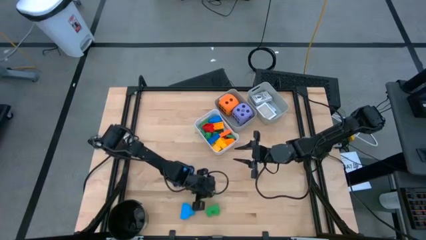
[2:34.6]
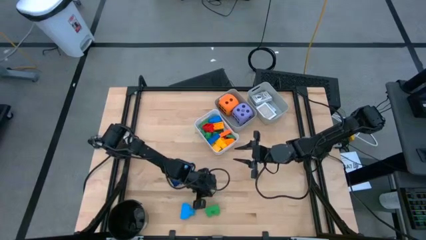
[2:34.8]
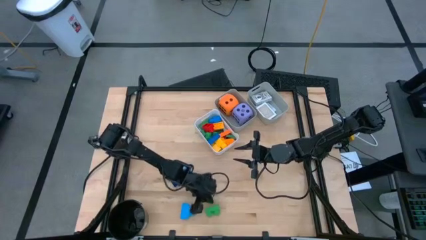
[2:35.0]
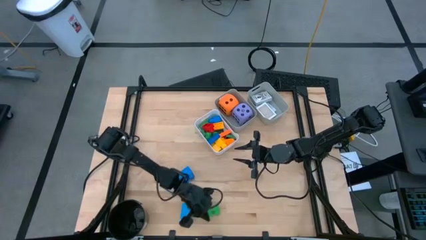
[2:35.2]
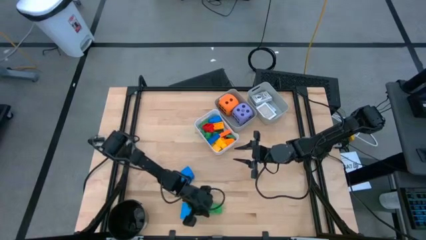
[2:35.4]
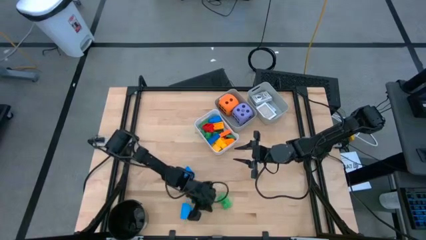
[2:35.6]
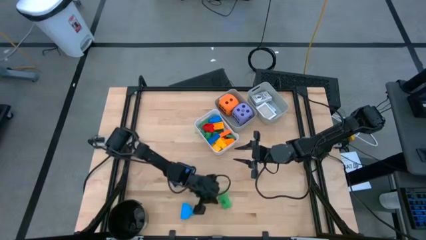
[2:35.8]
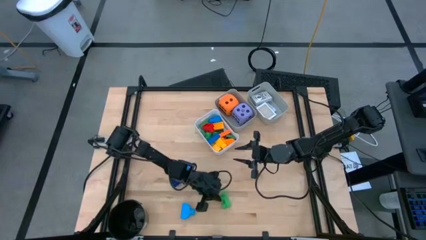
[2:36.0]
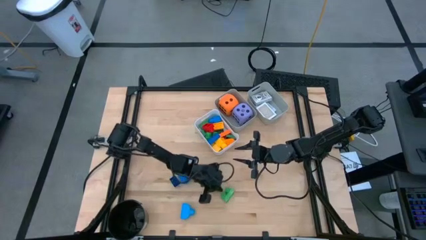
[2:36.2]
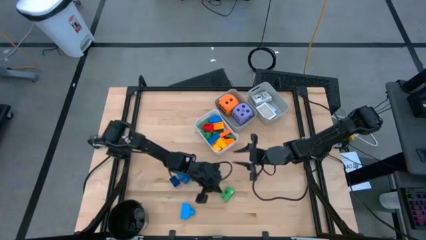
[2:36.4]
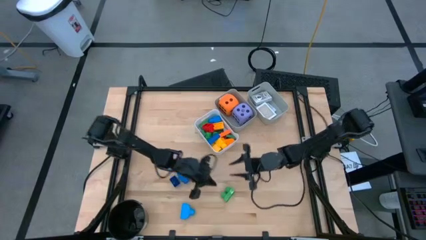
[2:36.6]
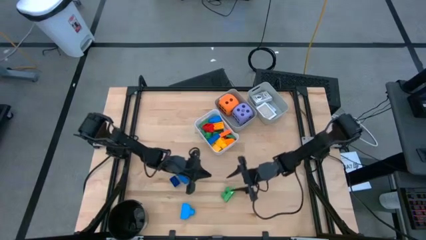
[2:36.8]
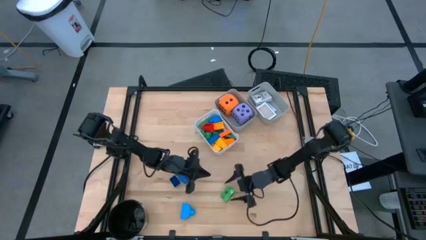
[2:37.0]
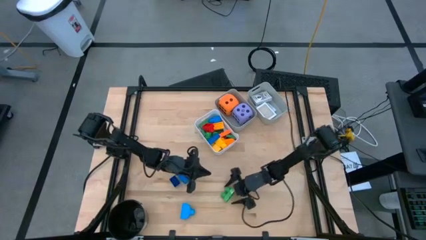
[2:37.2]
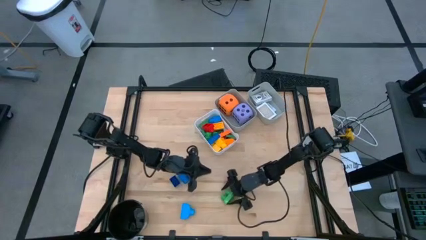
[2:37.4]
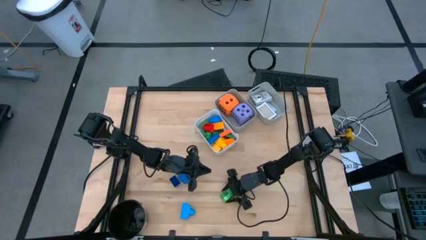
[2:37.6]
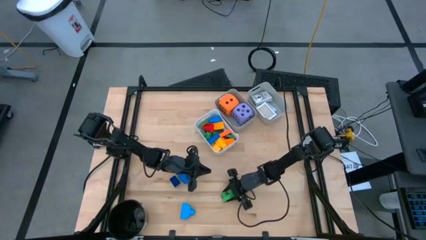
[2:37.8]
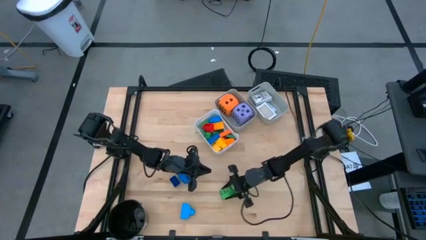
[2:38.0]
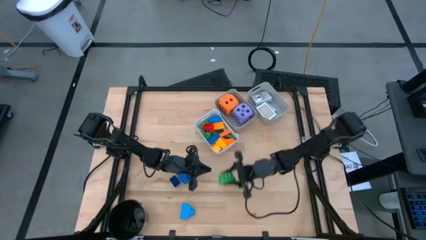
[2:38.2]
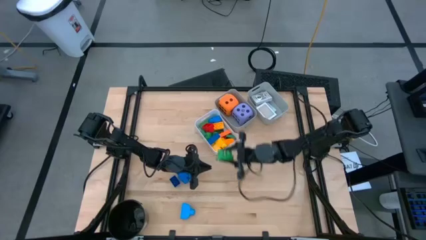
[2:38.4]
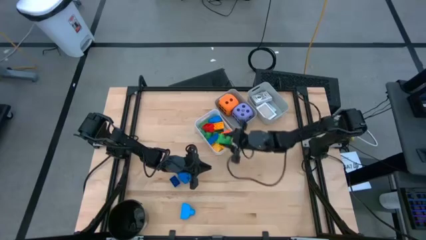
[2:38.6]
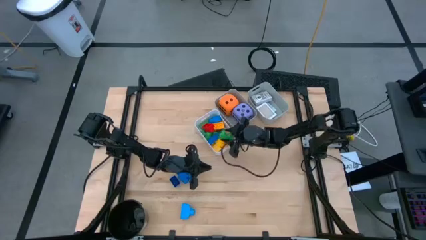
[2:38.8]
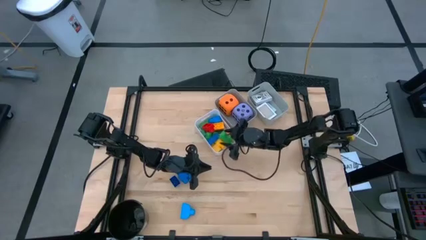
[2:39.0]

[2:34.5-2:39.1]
Task: Pick & Place Toys
Put the green game piece into the white bin

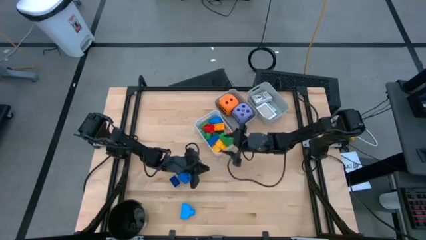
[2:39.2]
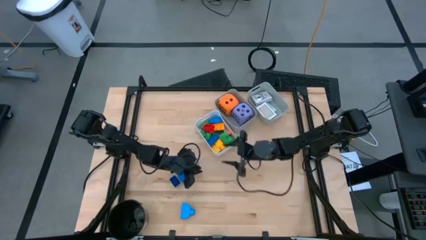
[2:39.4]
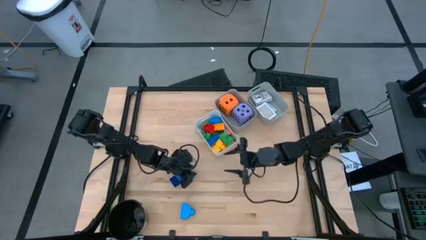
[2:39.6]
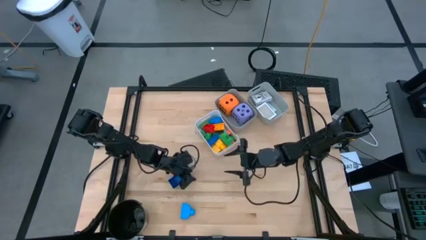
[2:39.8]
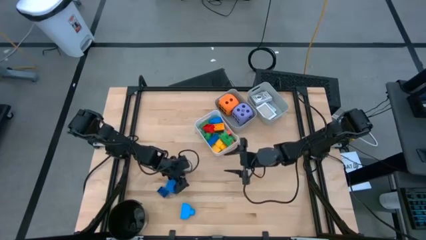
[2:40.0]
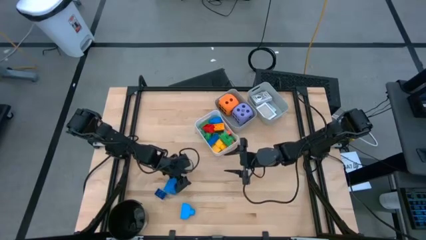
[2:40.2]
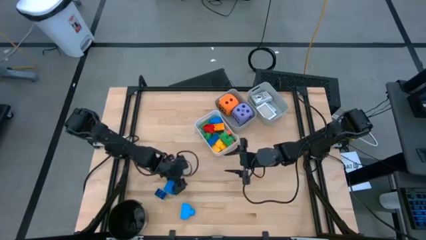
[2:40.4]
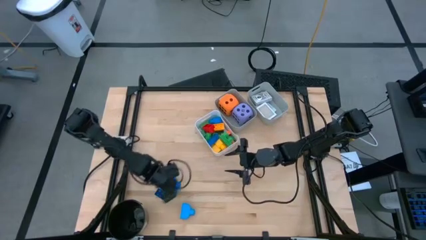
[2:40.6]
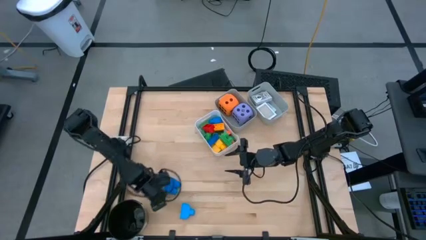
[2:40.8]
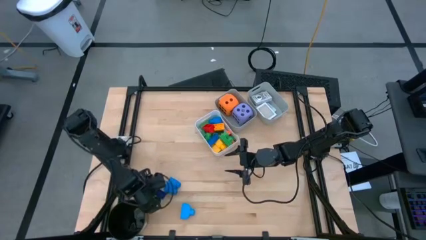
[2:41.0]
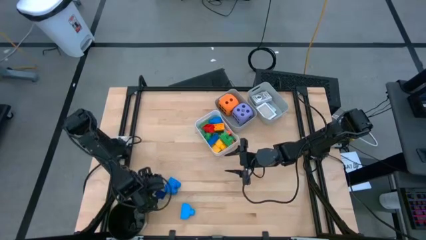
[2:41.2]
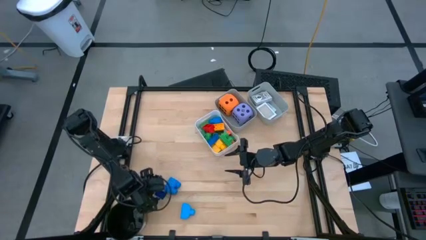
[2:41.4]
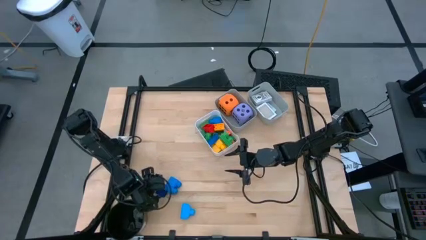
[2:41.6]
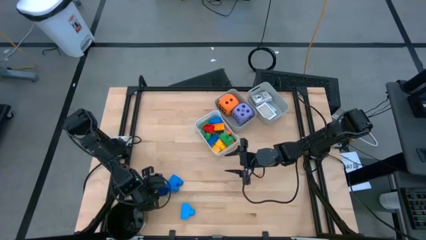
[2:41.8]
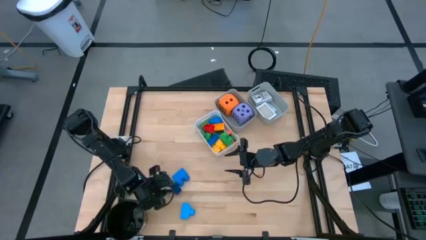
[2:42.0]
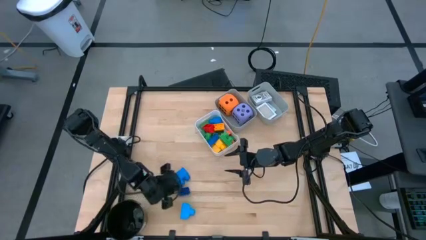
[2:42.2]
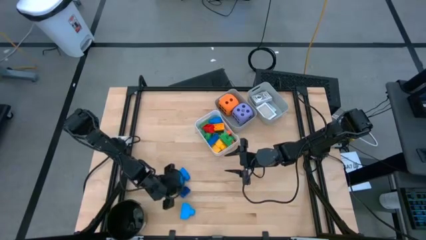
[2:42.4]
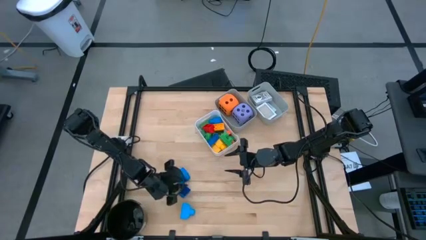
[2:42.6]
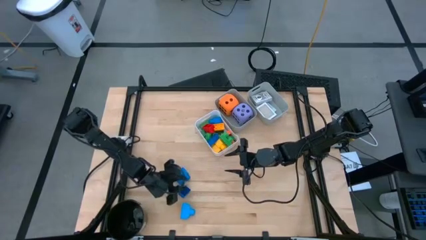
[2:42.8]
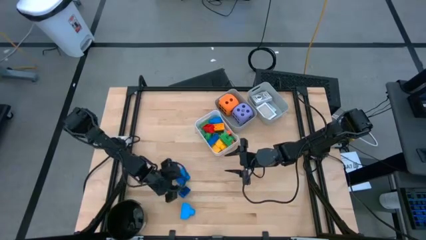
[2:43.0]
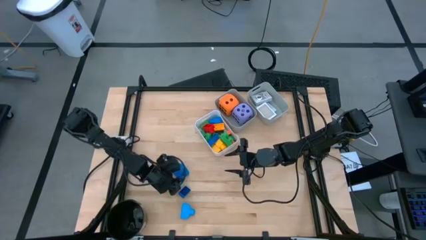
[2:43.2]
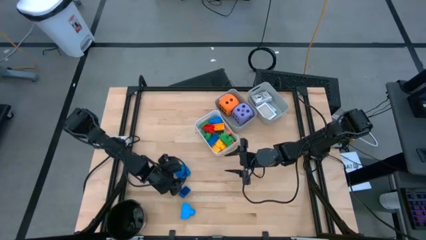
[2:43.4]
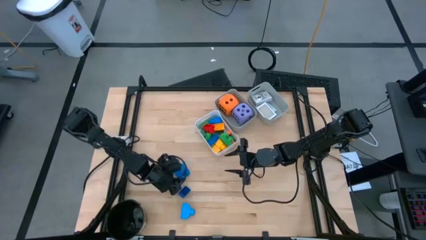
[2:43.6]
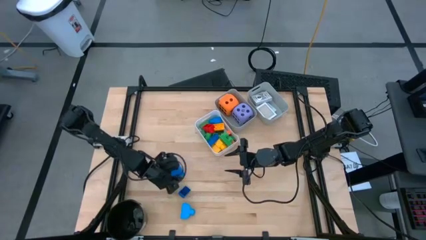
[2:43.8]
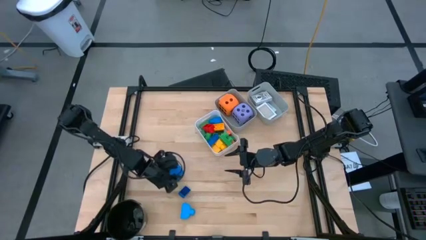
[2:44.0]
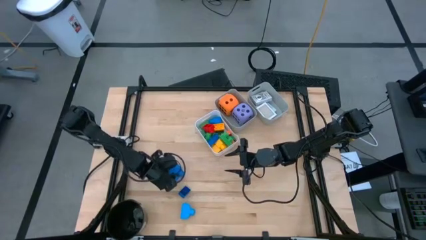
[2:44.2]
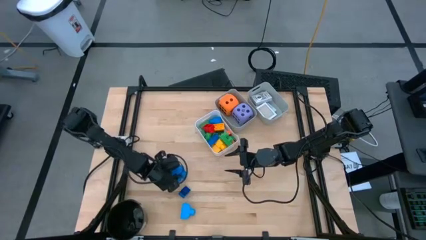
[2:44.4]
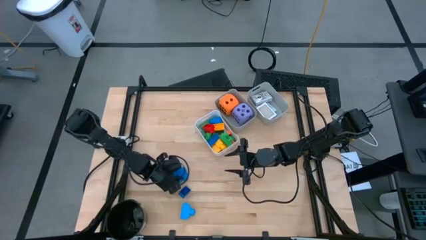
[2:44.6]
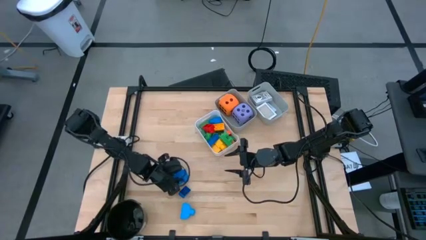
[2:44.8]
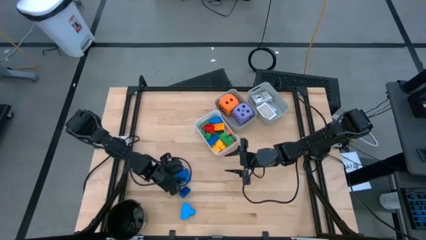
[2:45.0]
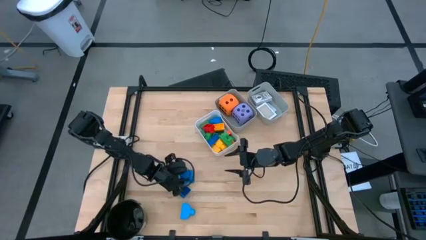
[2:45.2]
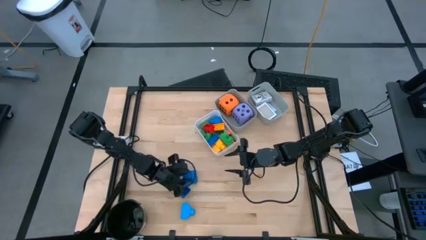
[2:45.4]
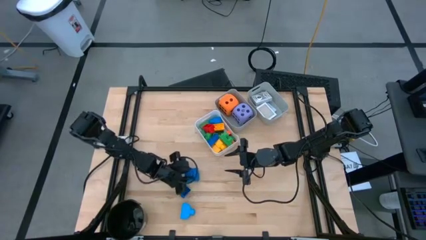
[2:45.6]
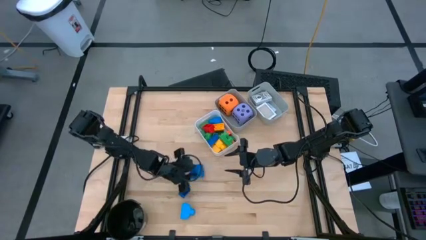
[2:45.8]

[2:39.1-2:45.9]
Put the blue game piece into the white bin

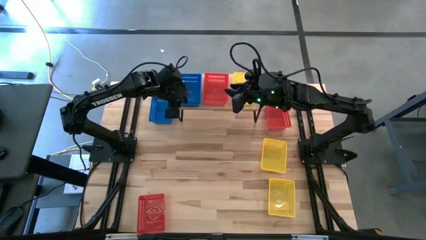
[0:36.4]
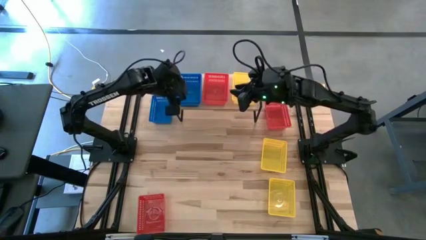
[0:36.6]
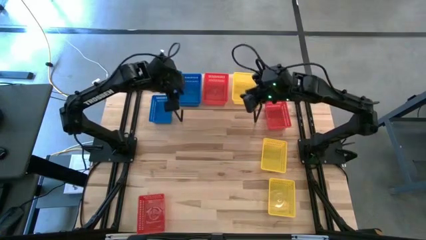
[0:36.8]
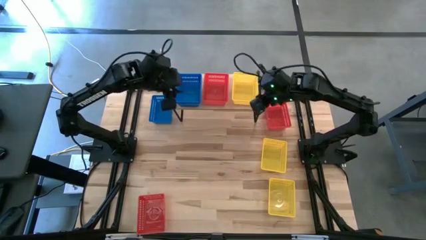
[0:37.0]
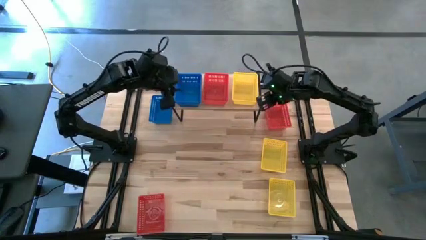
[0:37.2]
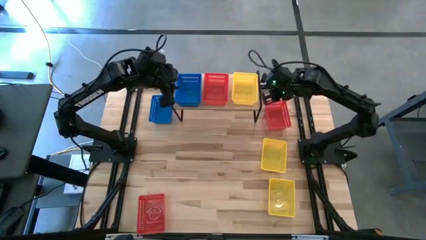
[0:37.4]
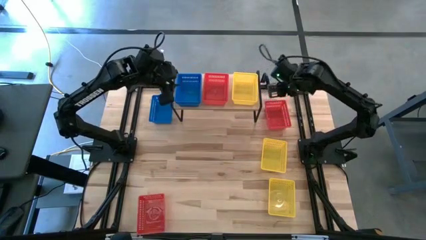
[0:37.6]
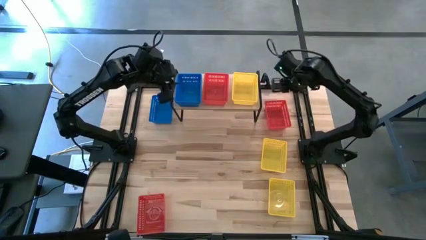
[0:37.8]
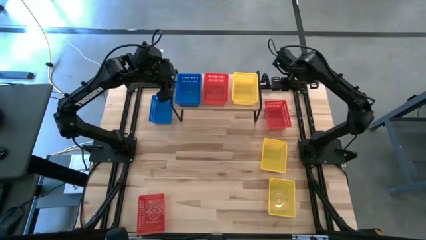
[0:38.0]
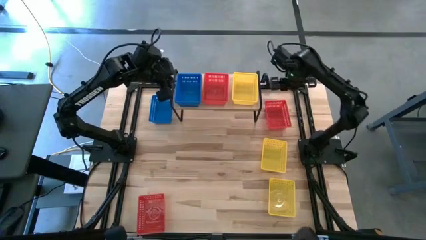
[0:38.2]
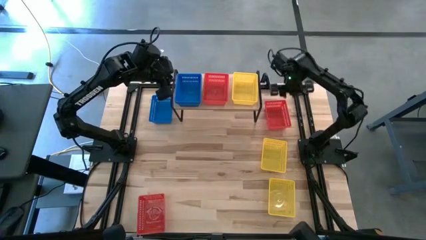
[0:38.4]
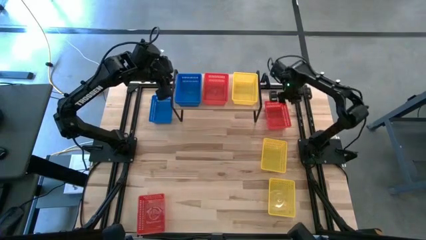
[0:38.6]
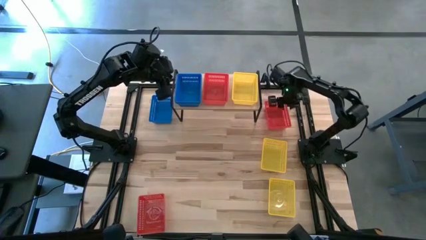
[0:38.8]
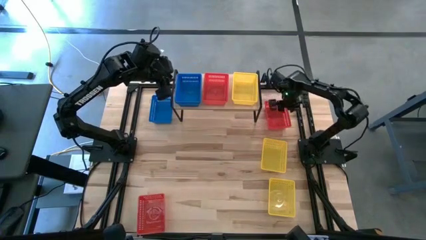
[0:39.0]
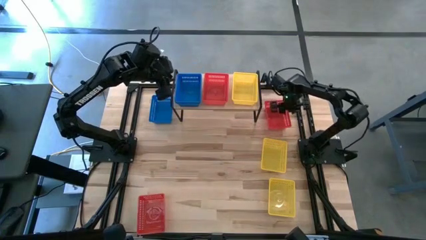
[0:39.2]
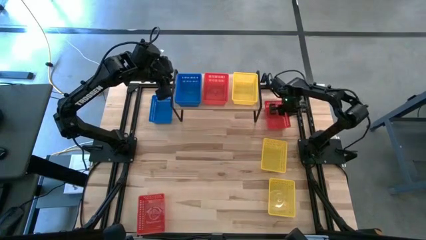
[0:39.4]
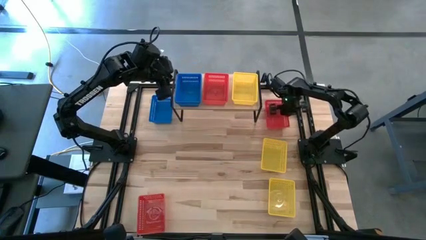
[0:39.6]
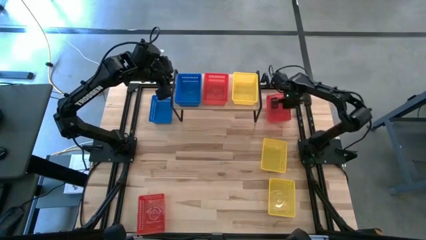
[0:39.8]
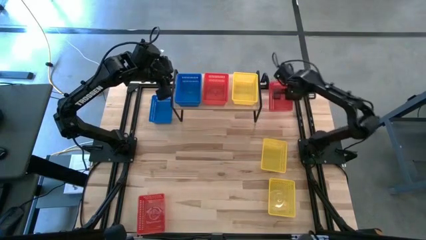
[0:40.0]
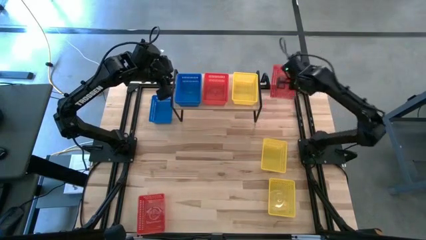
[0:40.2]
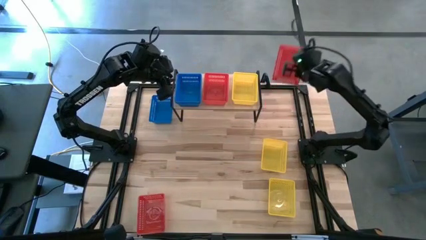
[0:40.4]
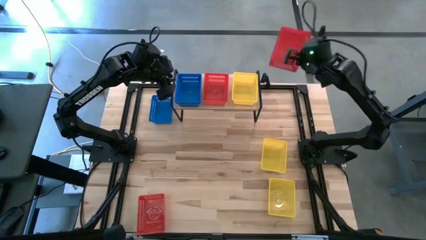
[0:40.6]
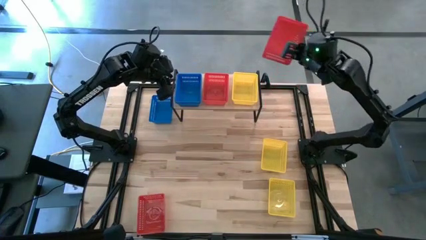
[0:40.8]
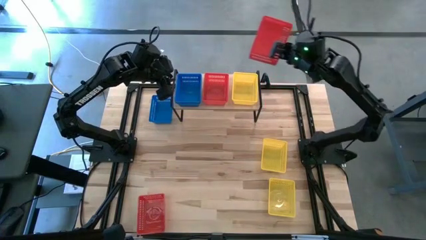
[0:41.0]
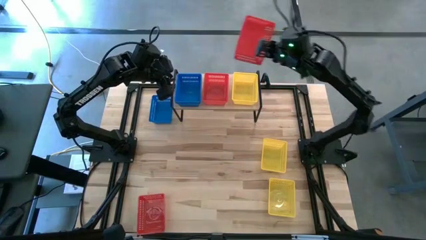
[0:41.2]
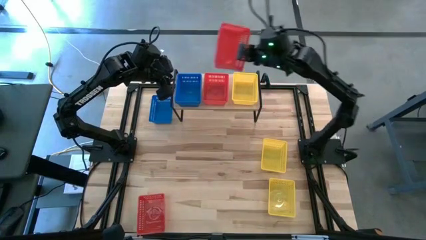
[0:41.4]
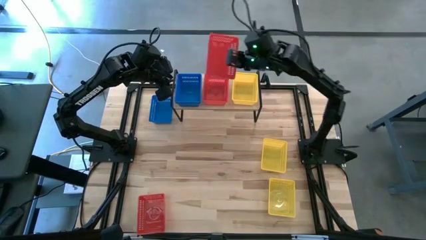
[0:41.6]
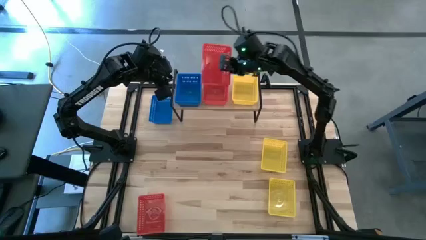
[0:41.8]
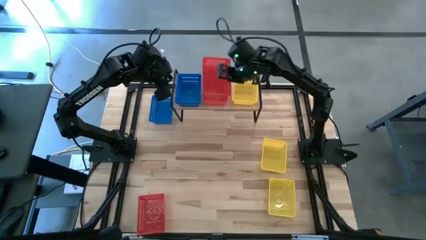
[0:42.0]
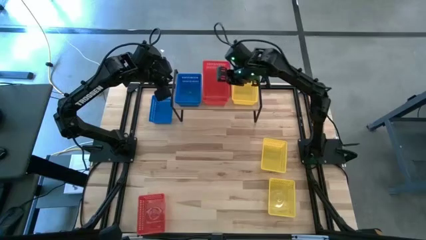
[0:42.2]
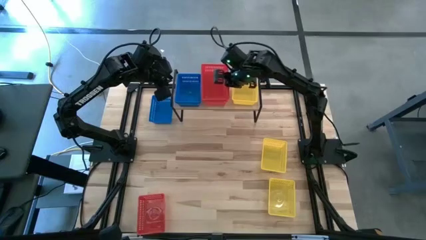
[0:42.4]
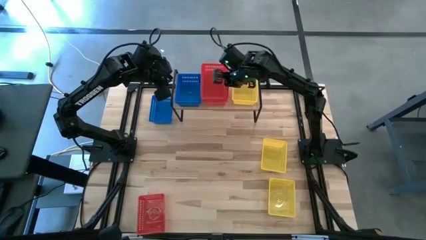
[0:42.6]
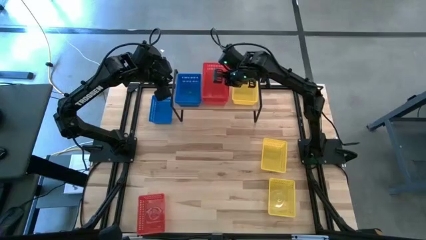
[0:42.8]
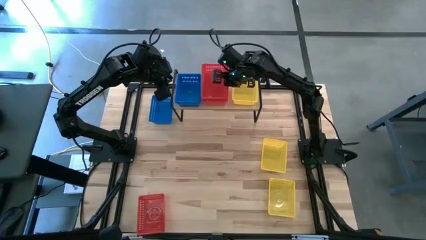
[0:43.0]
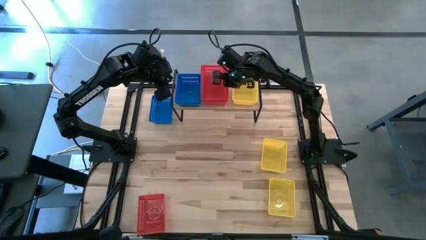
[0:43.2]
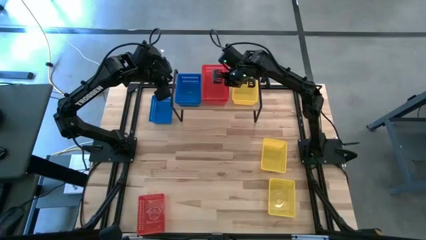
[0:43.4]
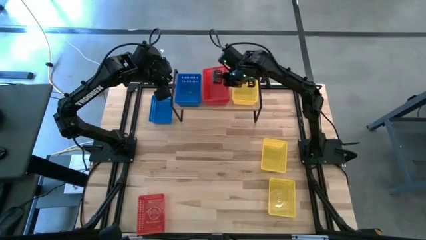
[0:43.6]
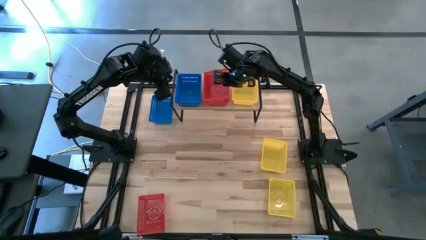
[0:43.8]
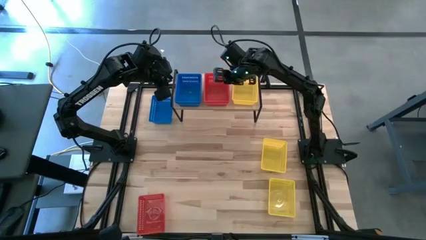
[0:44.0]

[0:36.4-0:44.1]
Task: Stack baskets on shelf by color
Stack the top red bin on top of the red bin on the shelf
